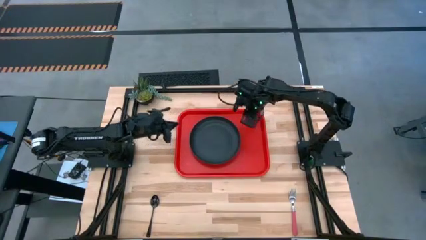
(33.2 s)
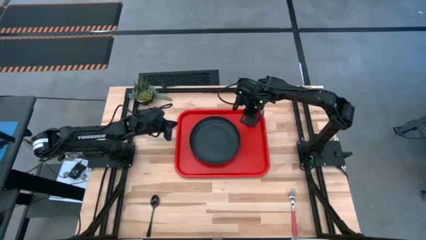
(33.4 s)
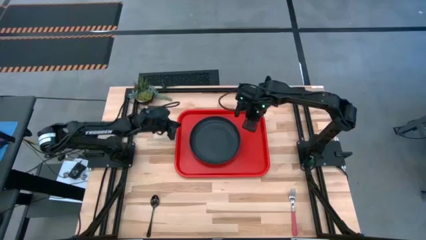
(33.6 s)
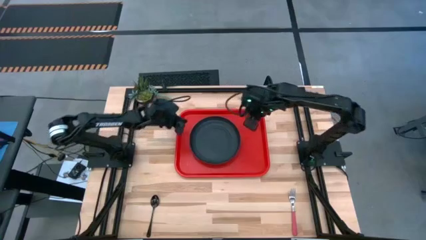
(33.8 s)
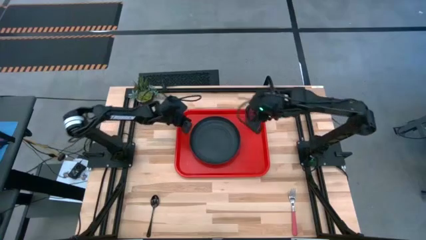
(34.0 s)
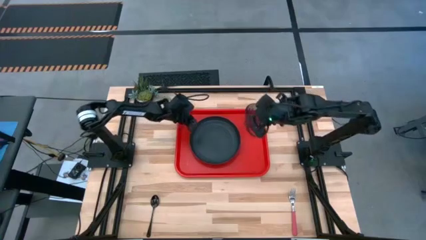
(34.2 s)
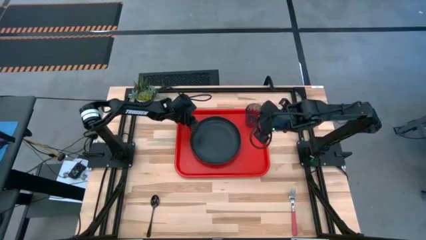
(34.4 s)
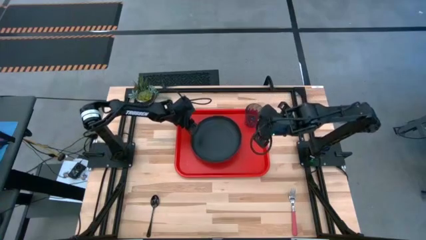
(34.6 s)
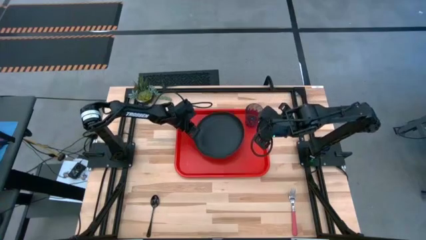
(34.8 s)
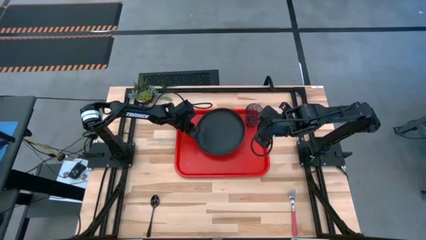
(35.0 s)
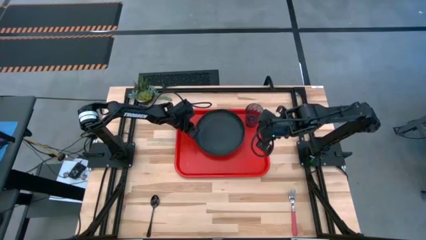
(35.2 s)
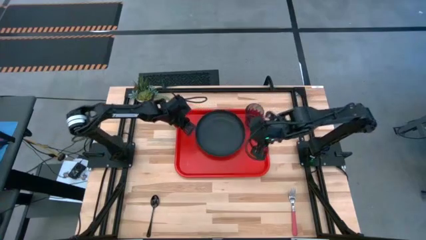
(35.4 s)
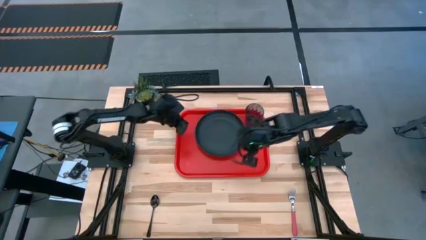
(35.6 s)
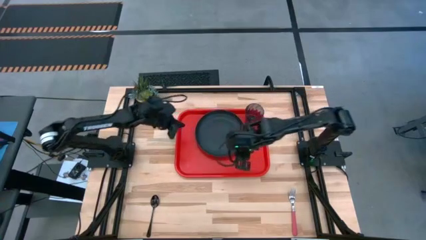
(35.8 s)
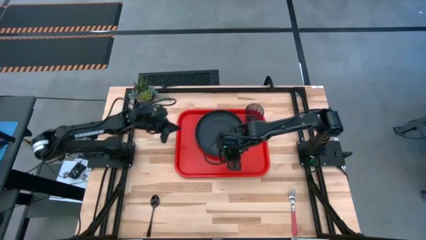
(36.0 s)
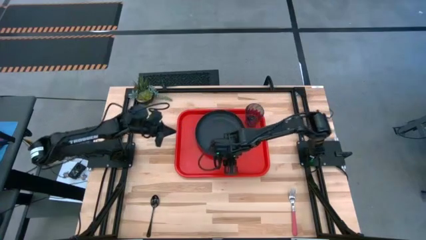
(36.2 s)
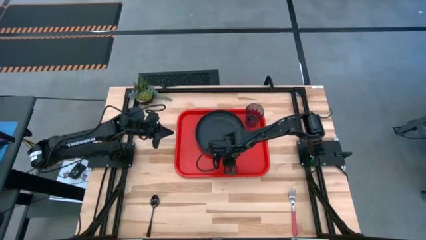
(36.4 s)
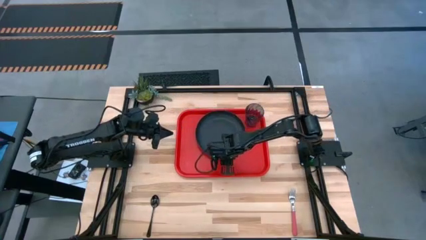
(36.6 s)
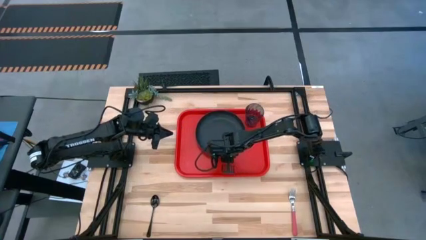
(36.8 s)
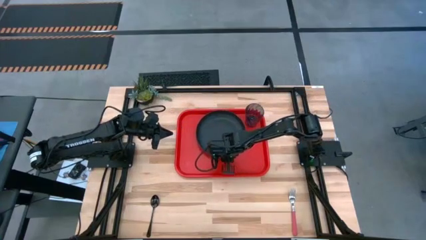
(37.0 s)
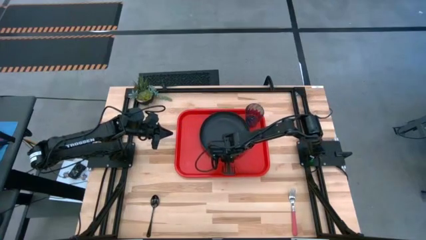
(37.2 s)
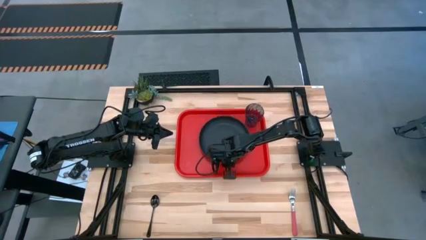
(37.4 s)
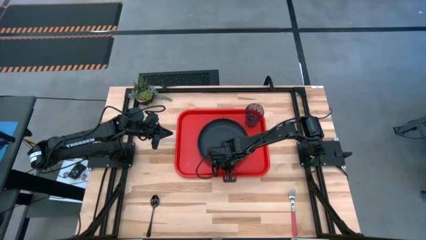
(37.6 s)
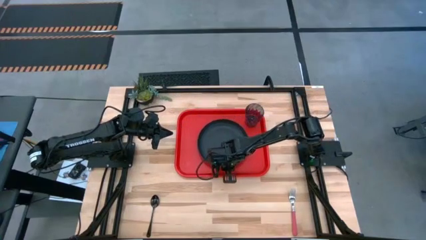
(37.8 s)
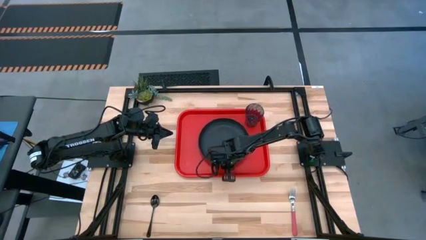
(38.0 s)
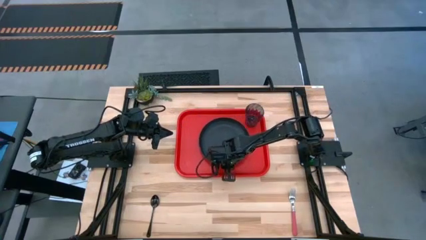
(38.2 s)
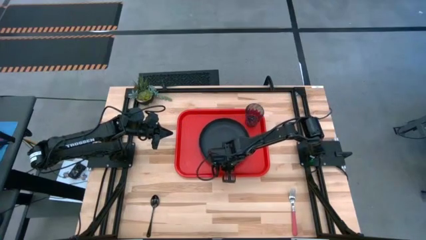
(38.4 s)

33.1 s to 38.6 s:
Task: Pick and place plate/cup/fork/spoon on tray
Adjust the black plate on the red serving tray

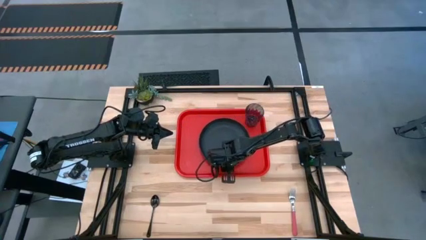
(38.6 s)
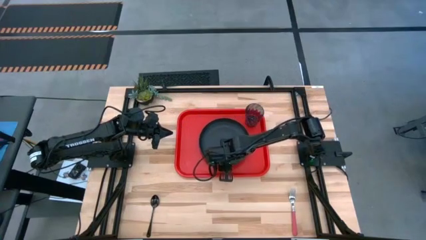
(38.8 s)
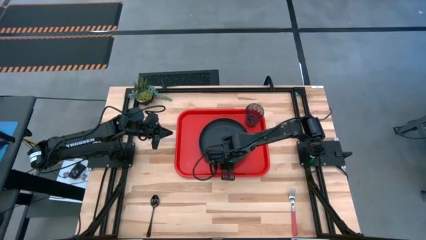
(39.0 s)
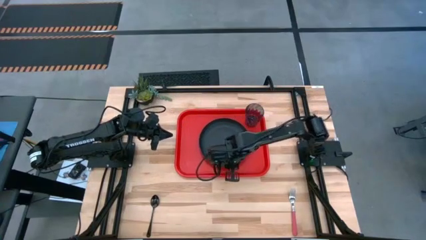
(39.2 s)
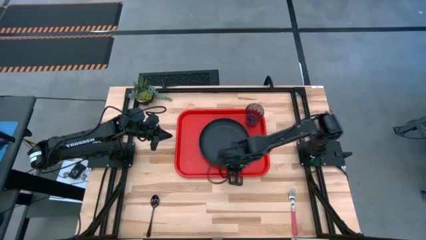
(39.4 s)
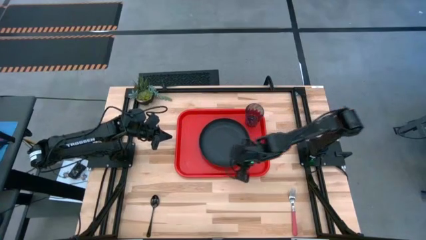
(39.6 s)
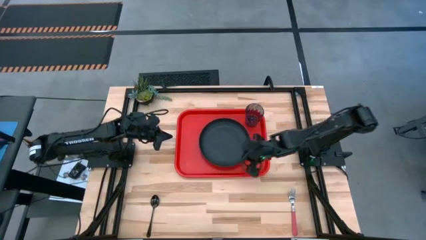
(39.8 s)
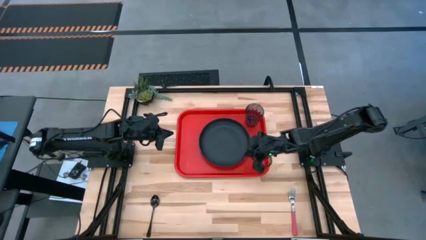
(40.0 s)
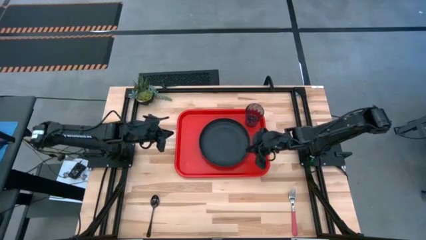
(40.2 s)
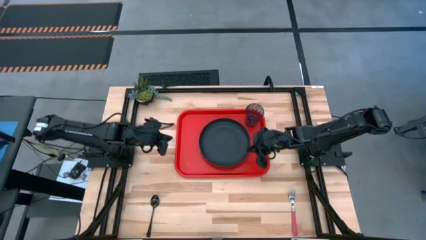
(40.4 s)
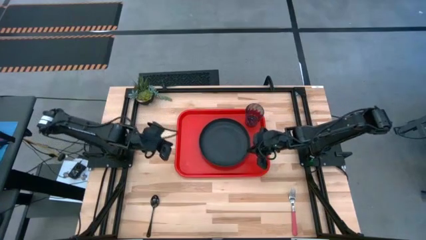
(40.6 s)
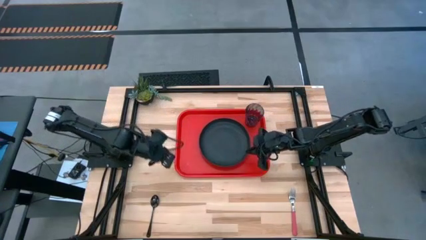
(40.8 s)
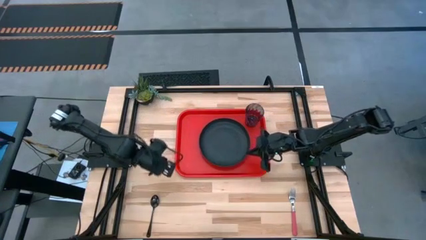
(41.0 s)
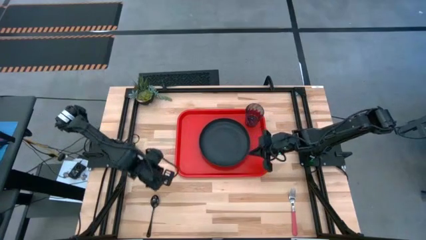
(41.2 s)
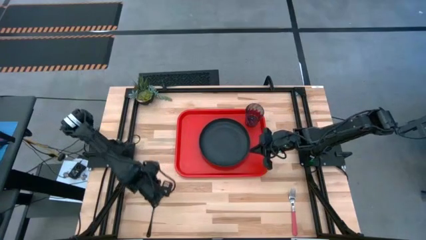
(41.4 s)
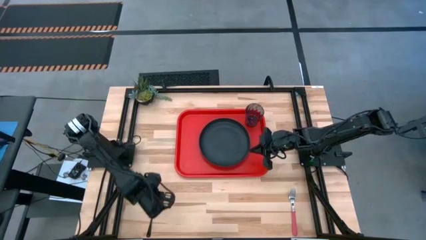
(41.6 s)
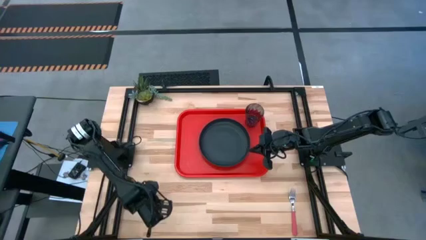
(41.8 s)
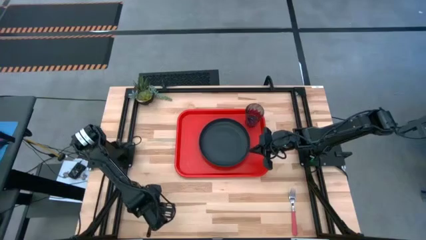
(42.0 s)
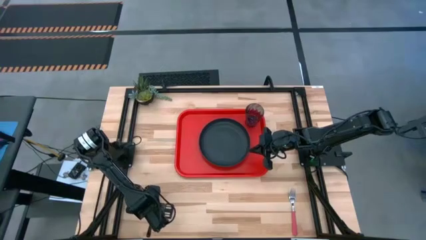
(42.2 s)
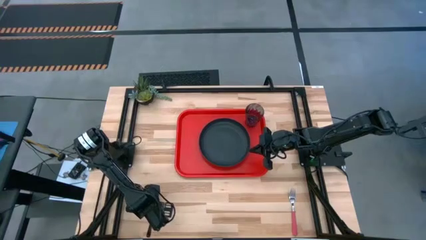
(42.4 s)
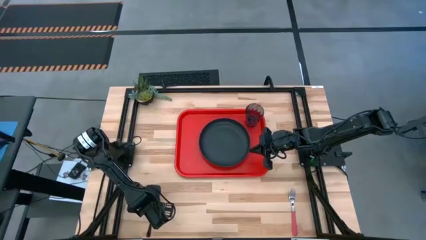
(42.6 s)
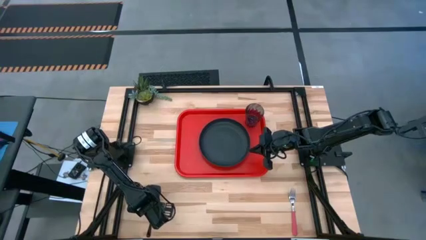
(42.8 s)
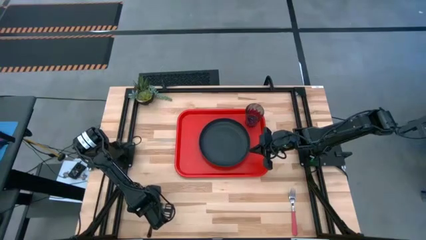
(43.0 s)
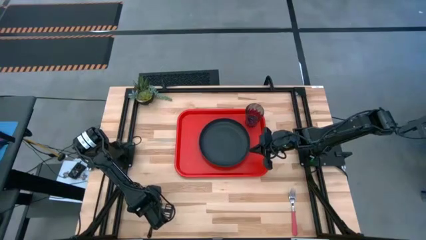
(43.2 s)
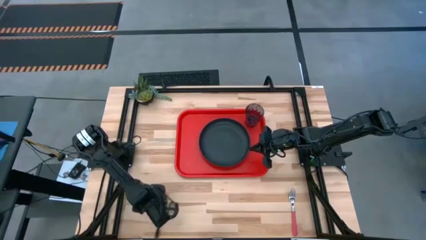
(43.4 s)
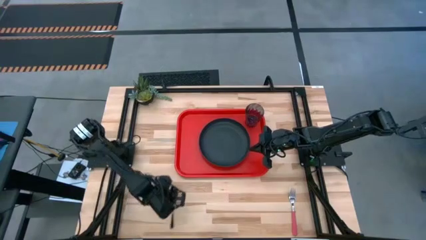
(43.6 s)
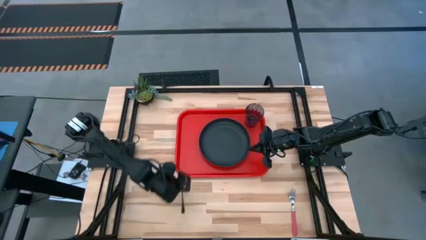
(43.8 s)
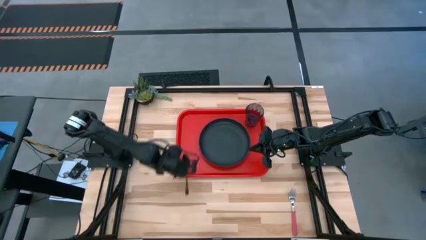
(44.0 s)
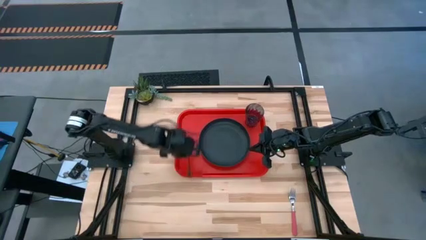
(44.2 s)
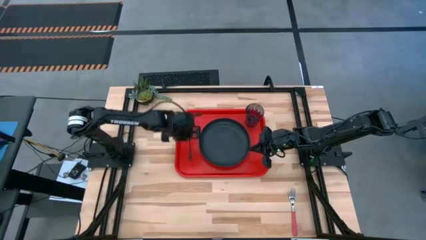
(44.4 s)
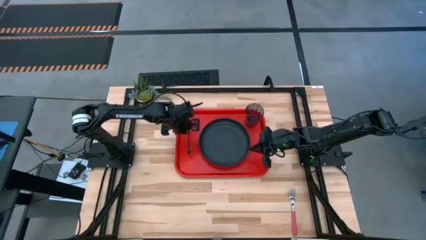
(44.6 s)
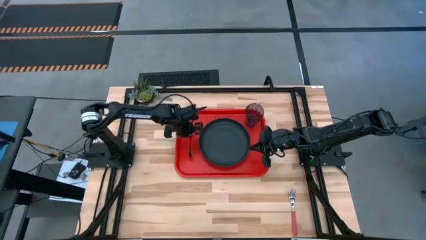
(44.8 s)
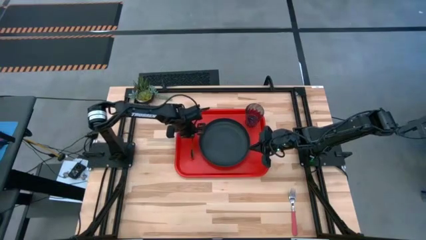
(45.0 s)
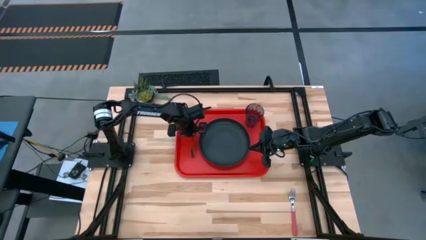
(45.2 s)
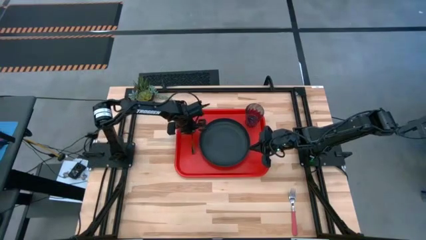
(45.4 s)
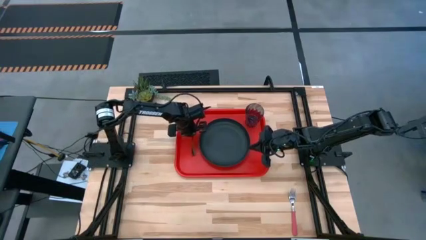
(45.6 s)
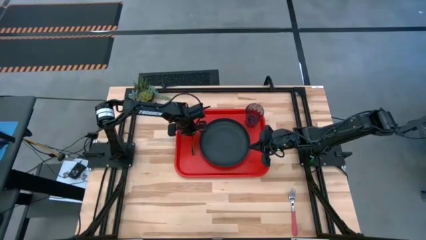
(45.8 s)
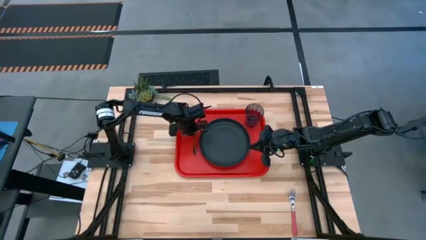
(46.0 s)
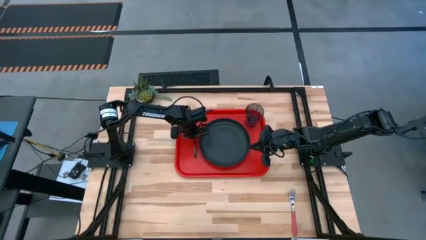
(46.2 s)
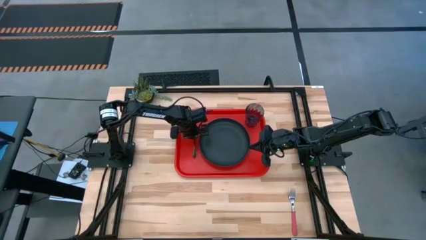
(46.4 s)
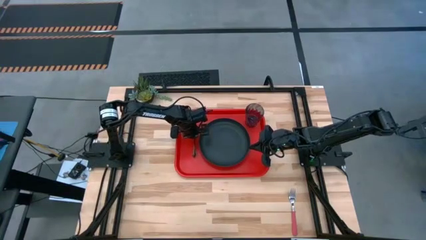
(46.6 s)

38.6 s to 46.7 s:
Put the black spoon on the red serving tray to the left of the black plate

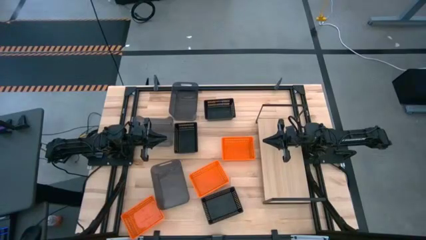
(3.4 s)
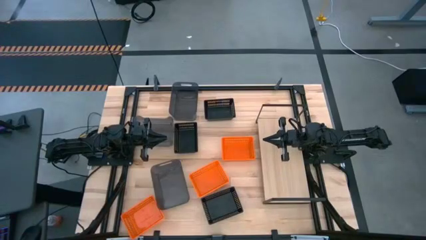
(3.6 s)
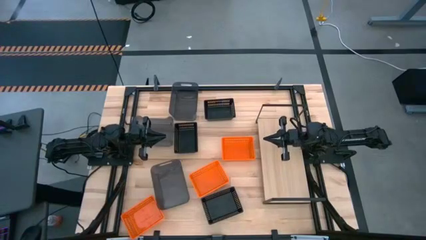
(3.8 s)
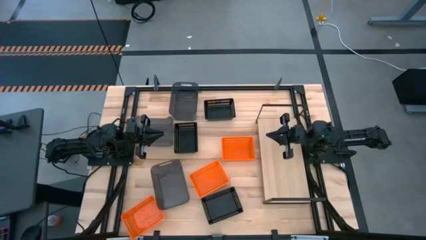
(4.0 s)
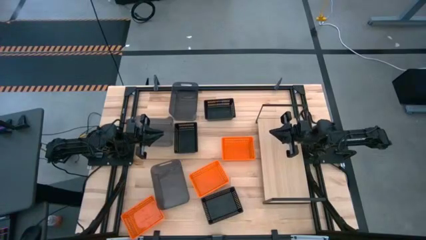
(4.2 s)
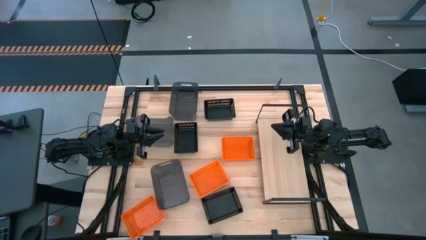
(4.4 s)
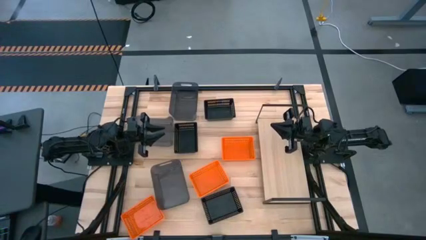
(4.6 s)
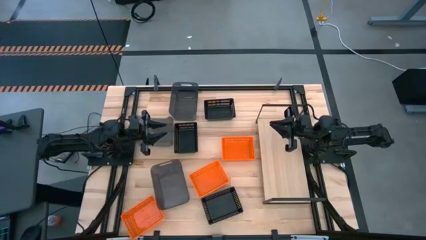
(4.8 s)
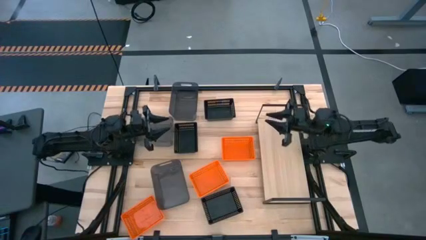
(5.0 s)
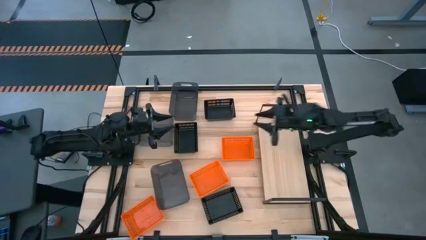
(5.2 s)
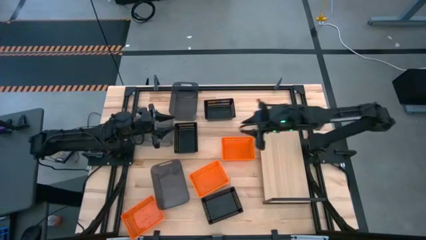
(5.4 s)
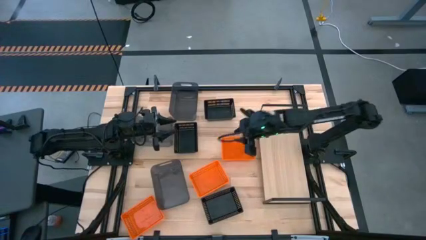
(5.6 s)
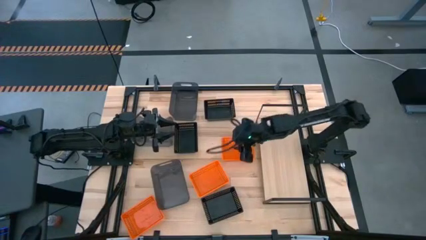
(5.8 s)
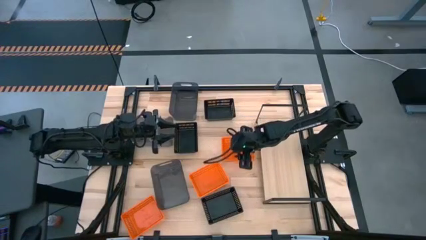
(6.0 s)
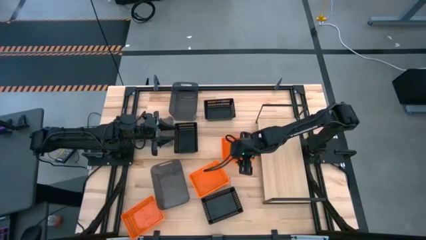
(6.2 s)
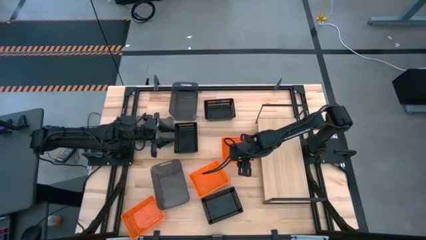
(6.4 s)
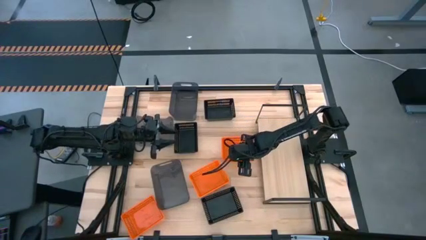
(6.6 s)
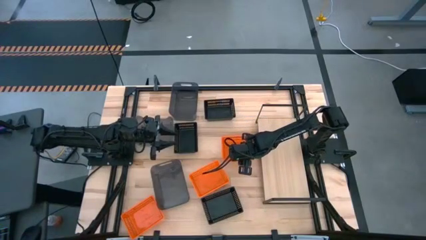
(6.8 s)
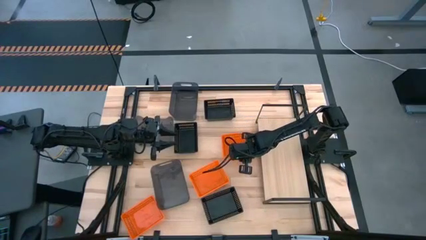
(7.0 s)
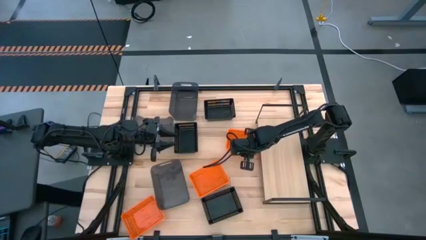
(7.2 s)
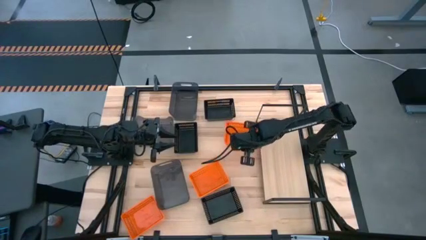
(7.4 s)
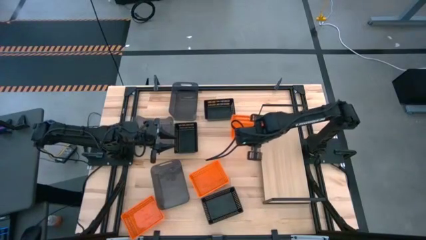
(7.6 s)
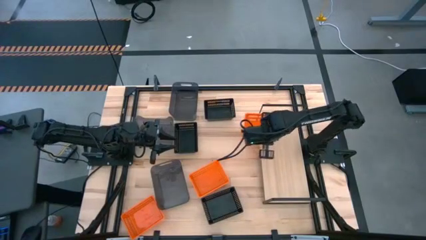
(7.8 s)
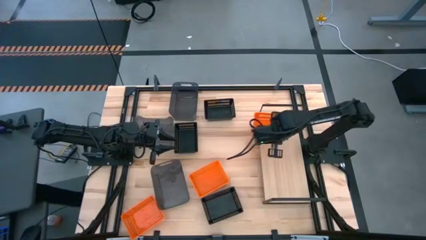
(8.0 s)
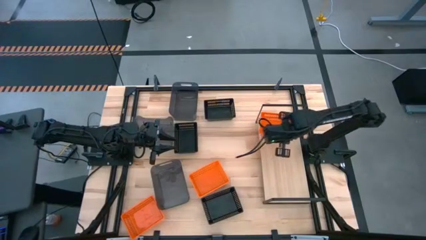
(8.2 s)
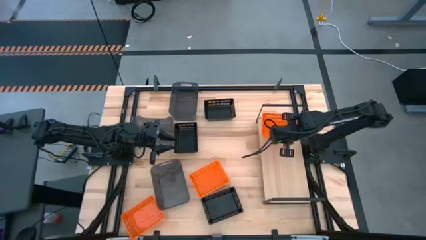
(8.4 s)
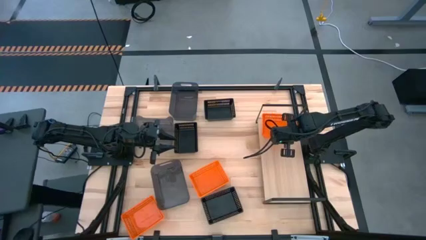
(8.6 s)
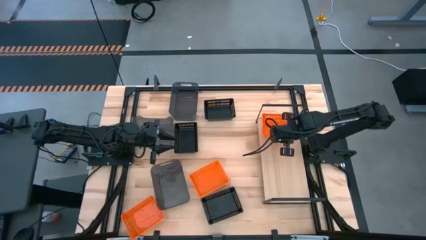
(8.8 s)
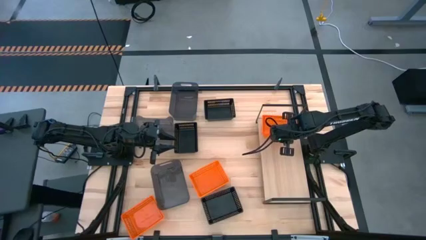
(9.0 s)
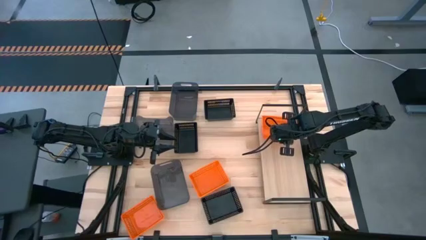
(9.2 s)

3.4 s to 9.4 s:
Task: Stack baskets on shelf by color
Put the top orange bin on the shelf
